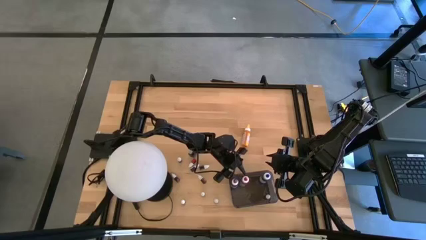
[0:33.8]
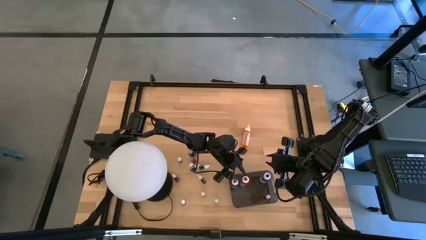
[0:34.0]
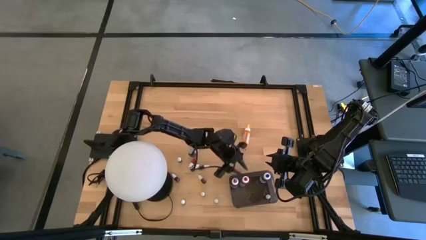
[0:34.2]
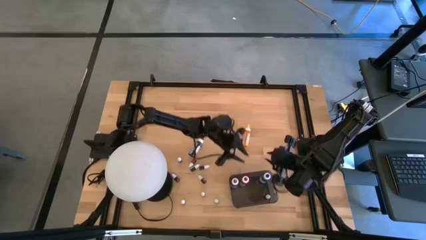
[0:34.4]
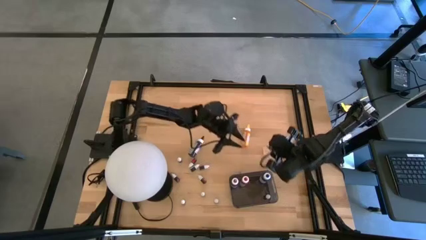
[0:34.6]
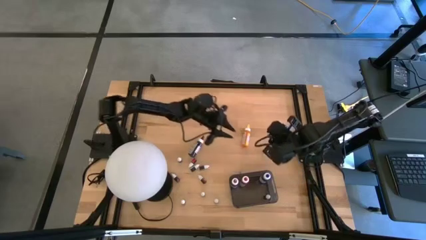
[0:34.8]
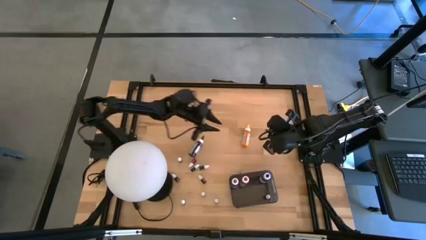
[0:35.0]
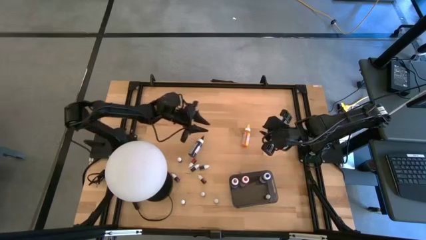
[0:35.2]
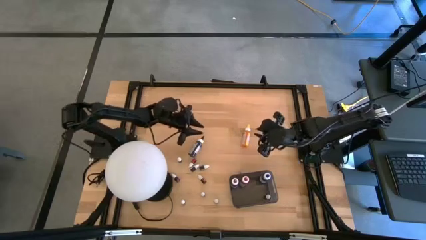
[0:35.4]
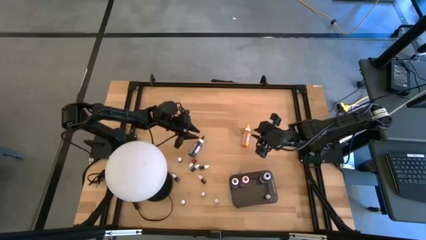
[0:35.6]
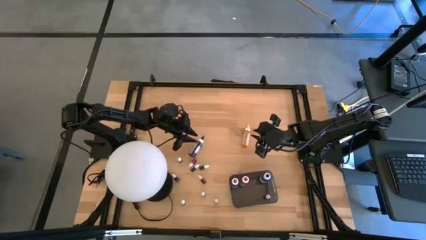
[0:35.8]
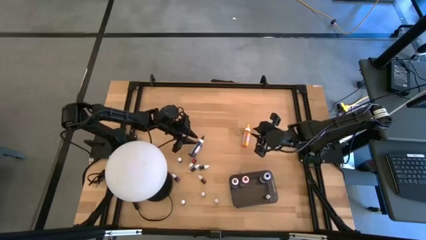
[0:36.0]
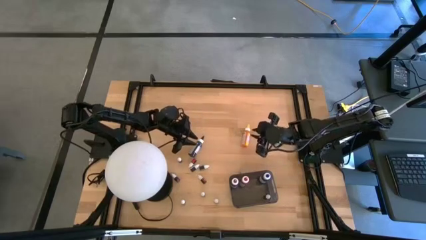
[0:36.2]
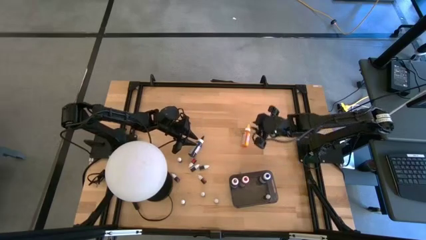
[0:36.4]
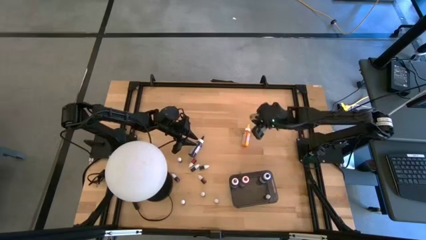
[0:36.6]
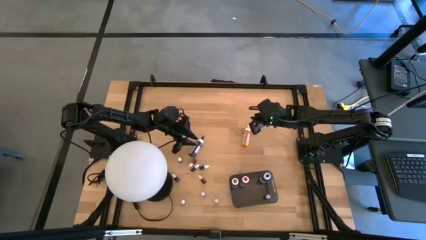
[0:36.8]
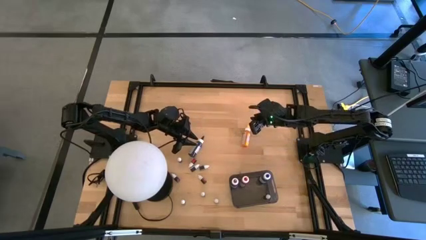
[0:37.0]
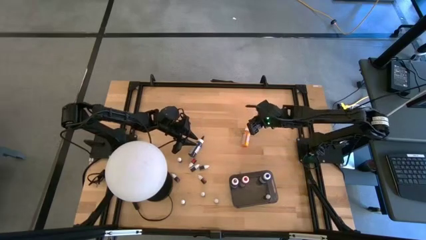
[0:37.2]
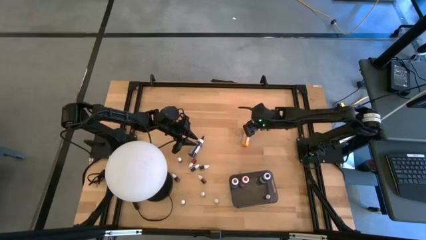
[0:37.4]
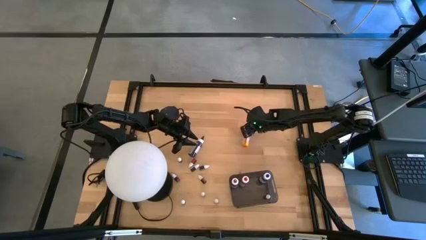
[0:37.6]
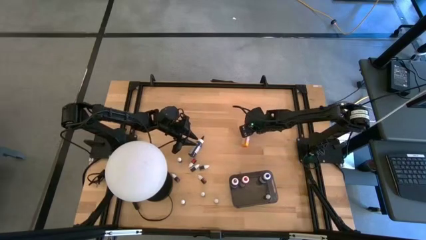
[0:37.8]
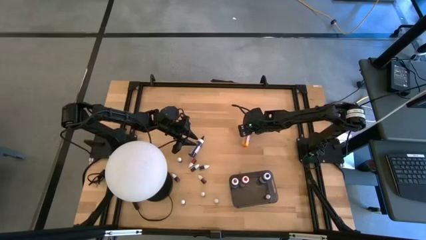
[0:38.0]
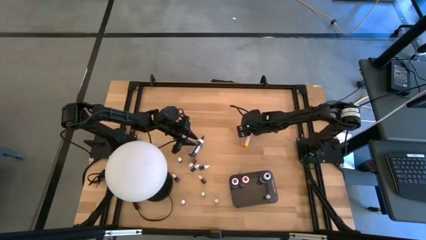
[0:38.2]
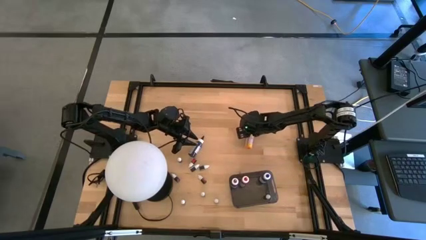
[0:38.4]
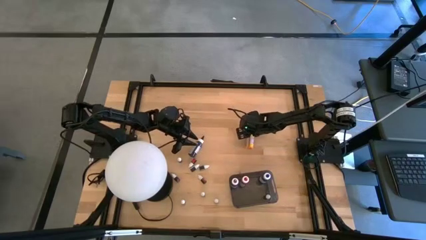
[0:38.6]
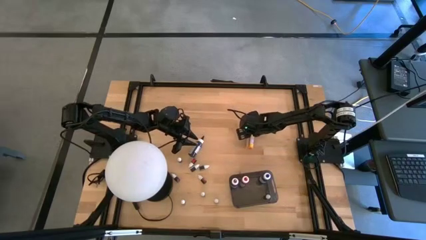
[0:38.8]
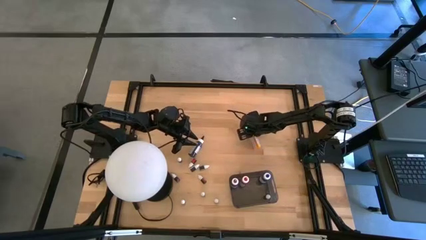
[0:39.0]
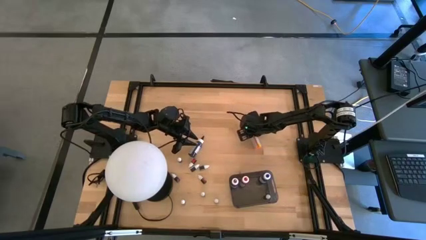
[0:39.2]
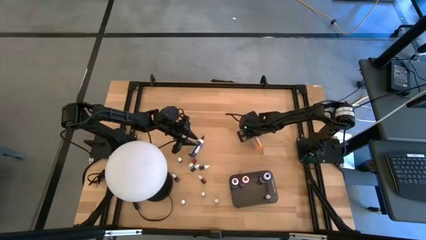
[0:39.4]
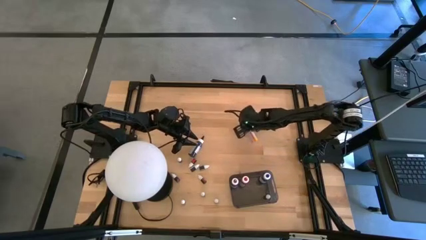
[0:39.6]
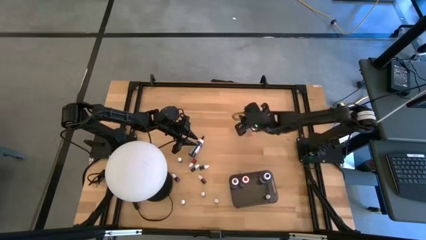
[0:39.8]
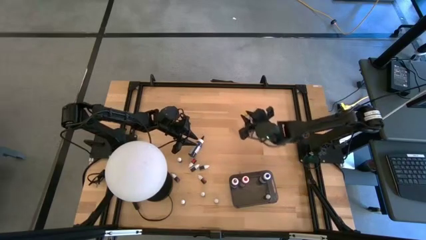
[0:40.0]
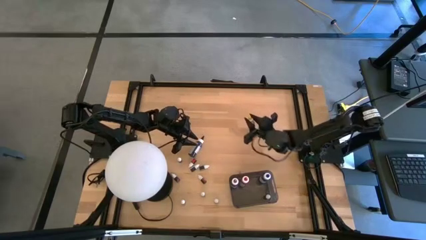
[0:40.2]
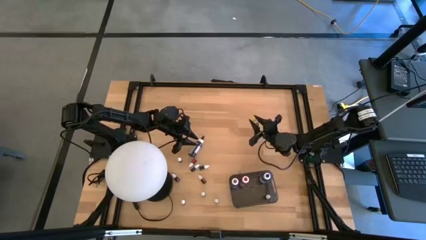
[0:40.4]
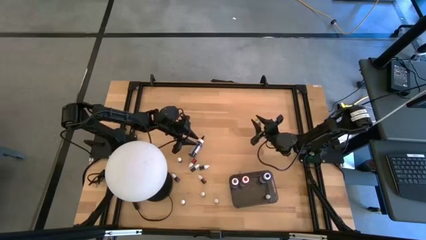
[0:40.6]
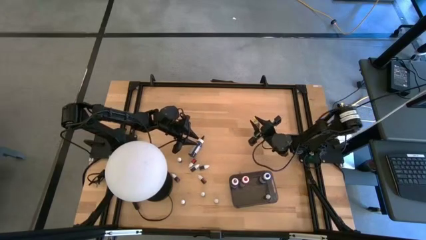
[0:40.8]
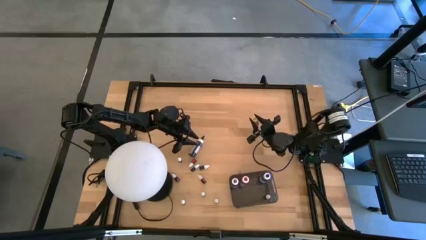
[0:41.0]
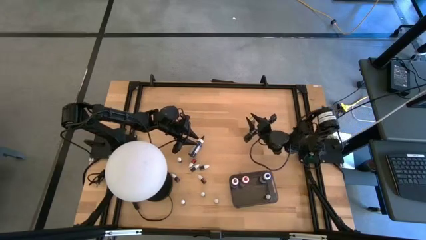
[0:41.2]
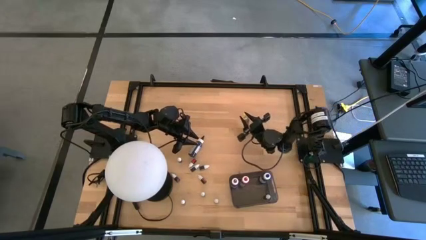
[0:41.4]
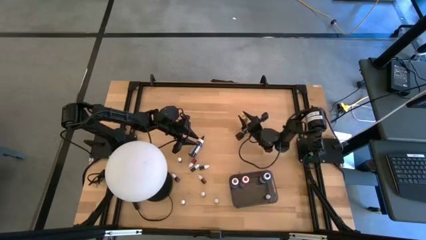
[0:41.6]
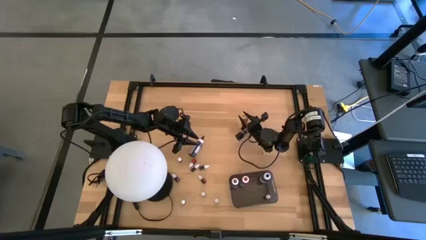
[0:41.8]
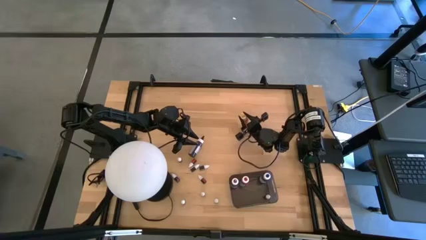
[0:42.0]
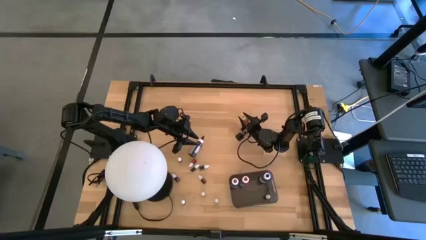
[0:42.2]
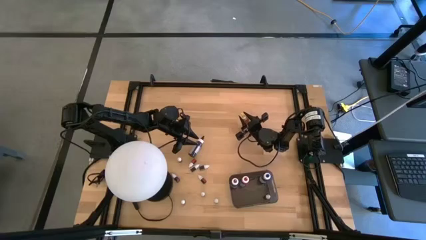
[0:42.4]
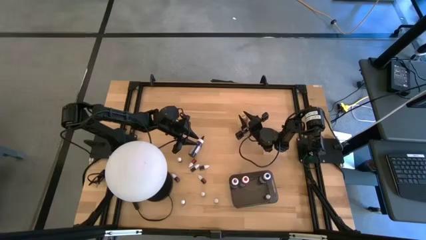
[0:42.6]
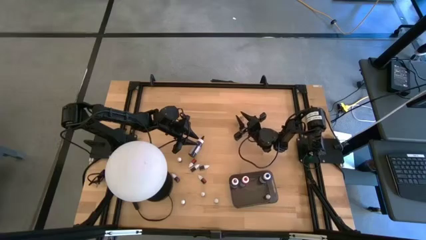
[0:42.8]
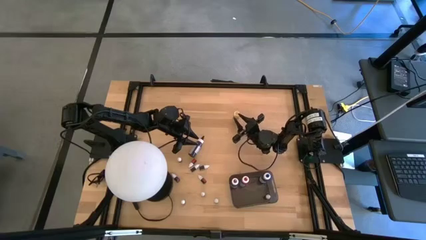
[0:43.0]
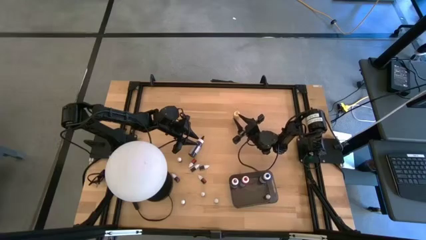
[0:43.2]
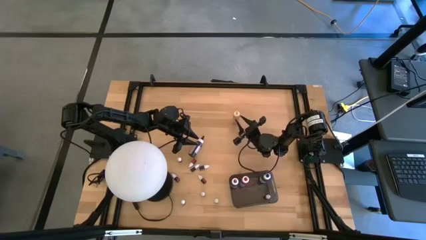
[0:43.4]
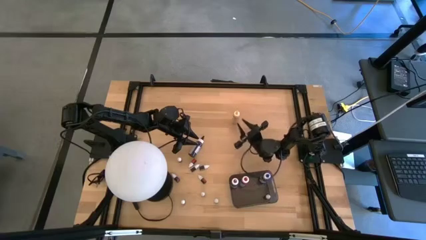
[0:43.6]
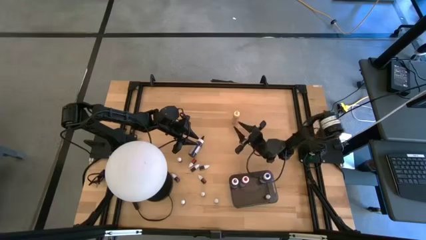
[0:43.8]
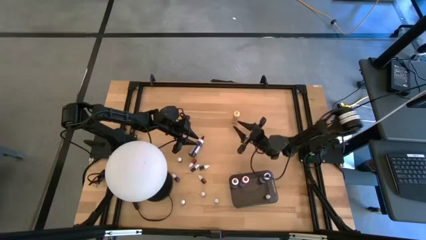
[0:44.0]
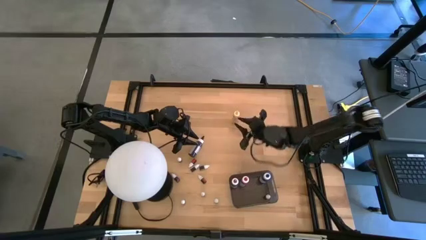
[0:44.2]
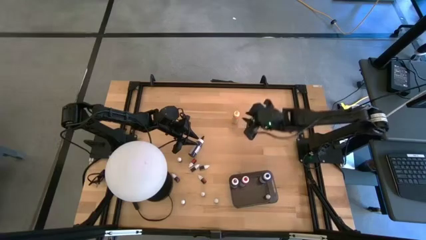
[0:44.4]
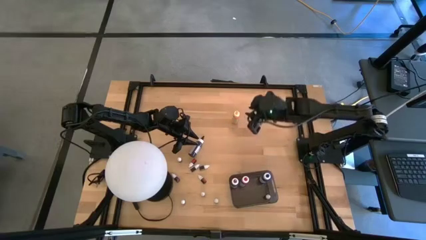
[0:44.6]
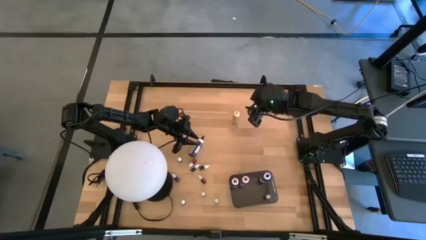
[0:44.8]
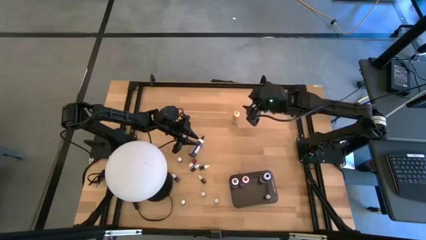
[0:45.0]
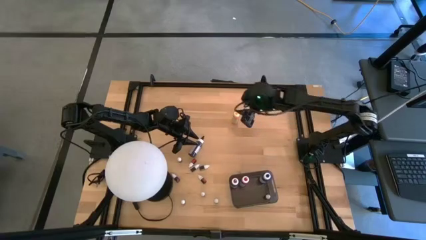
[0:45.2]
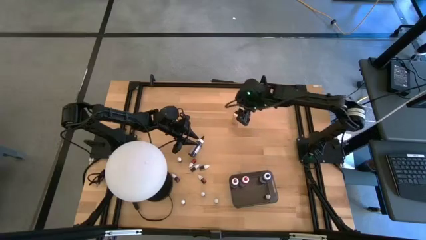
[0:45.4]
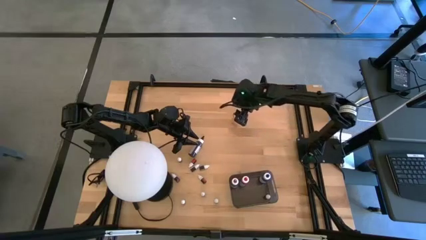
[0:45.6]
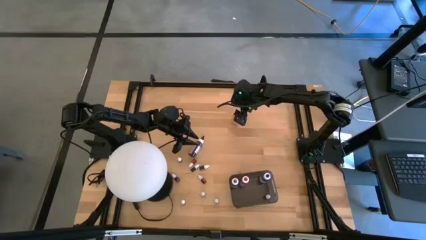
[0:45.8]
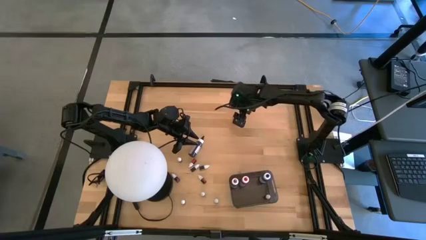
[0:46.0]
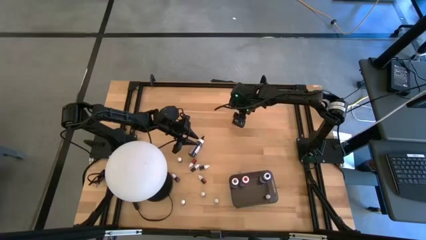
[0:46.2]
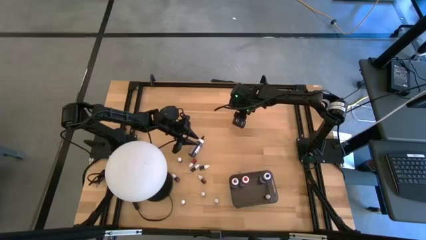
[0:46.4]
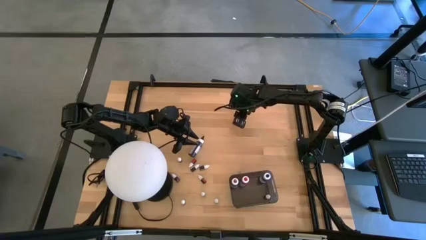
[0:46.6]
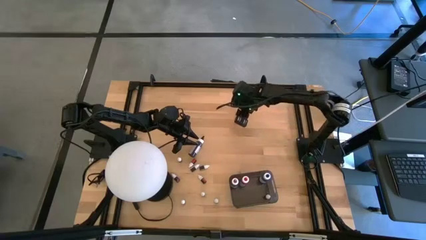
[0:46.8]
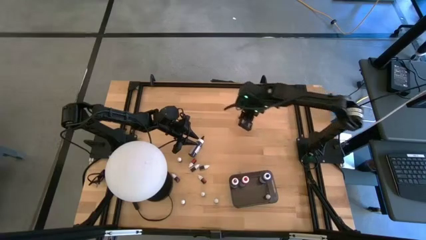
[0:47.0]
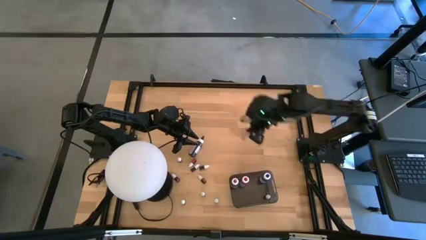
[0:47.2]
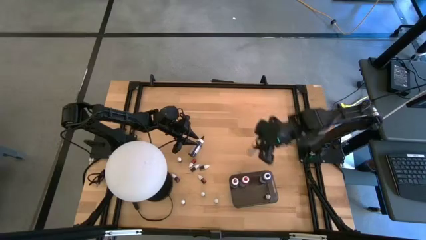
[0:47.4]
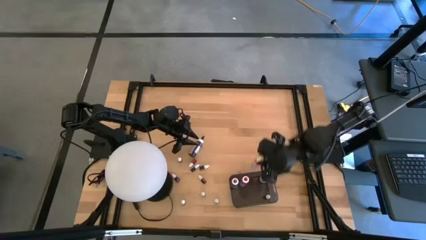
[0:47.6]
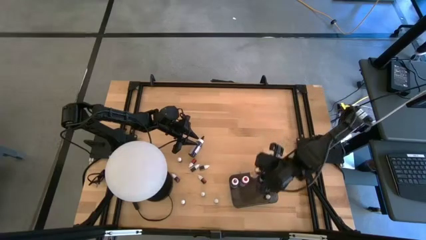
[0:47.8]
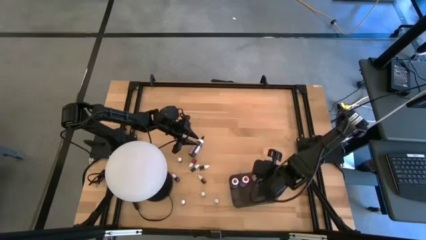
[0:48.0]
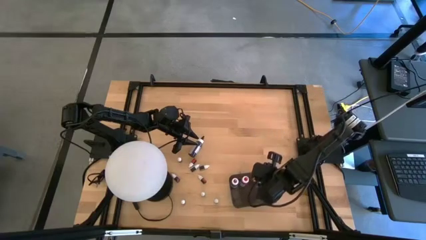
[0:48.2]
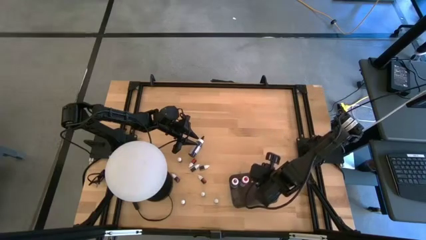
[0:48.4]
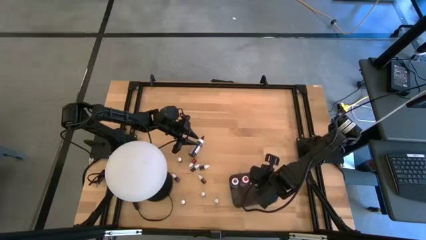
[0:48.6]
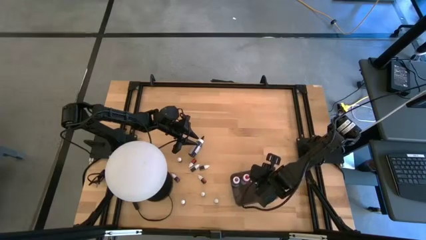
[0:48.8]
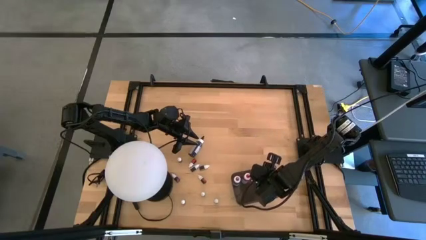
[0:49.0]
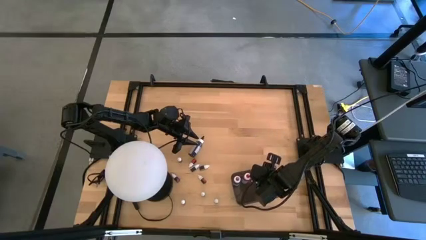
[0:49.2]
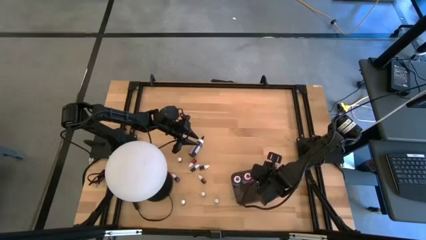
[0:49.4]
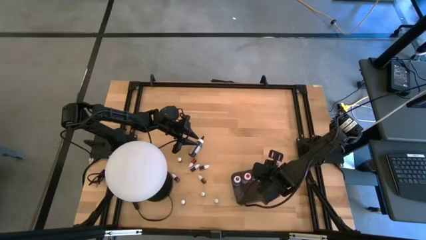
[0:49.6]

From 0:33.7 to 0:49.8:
Task: Pick & Place food coloring
Put the large yellow food coloring bottle into the bin
